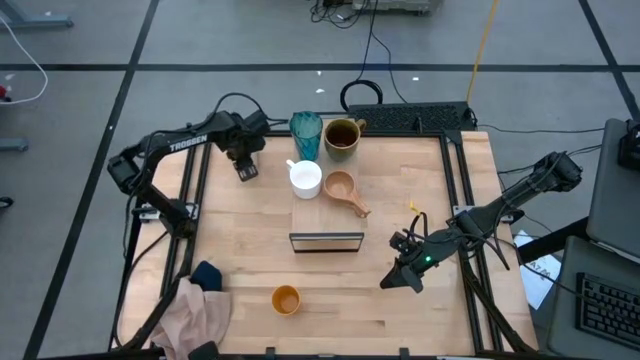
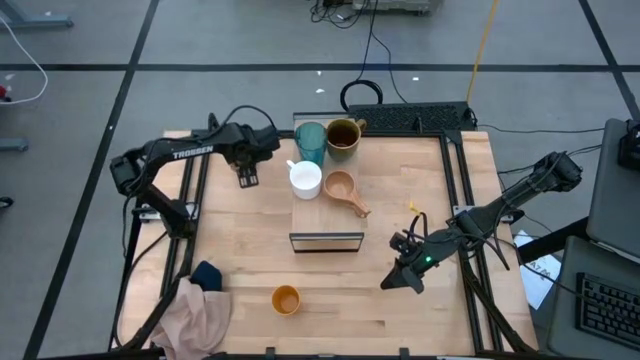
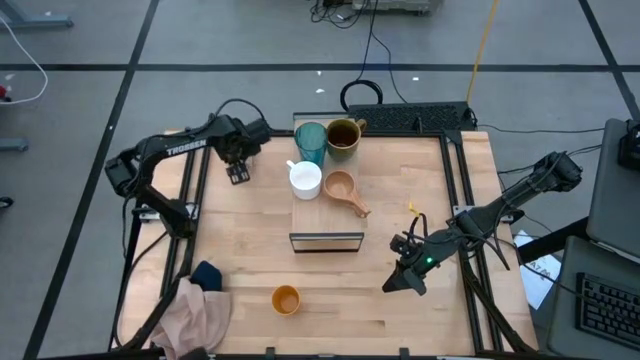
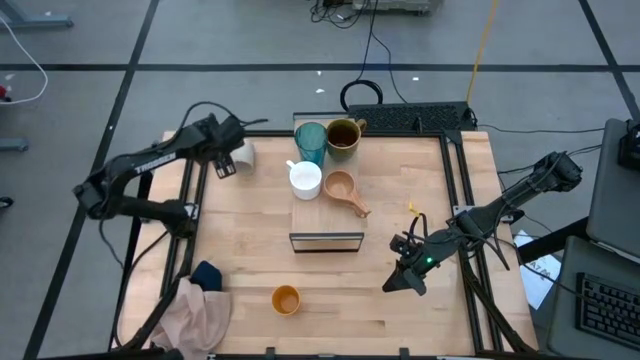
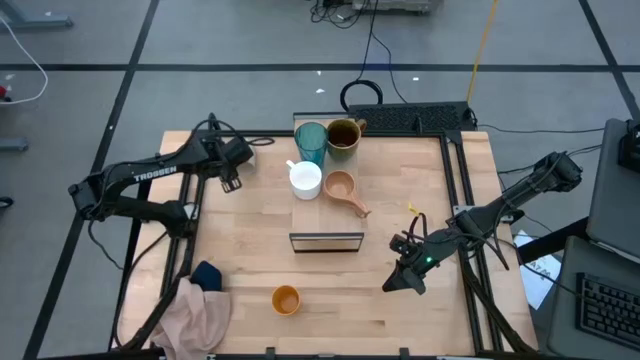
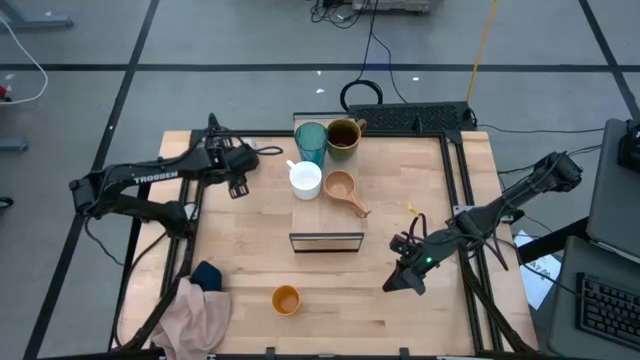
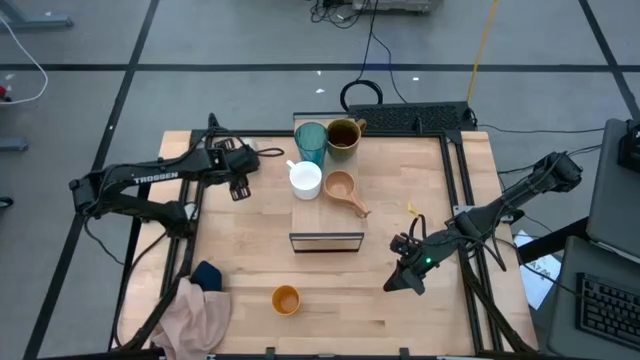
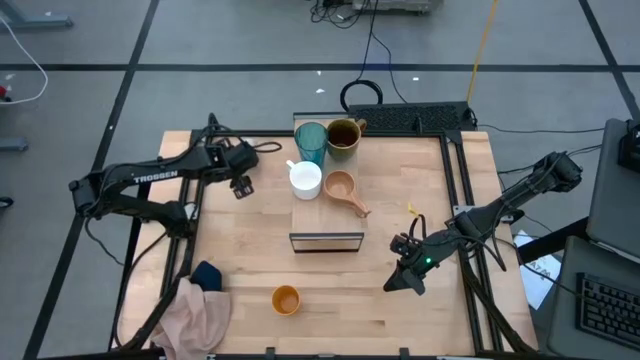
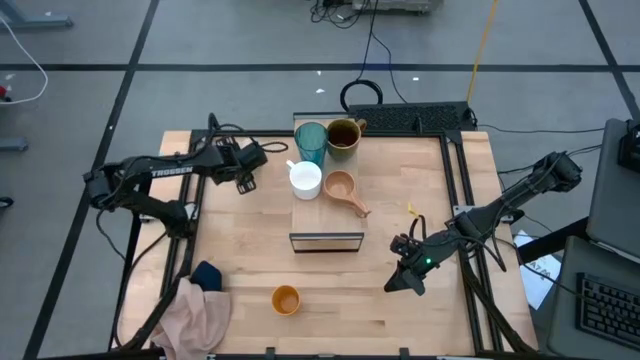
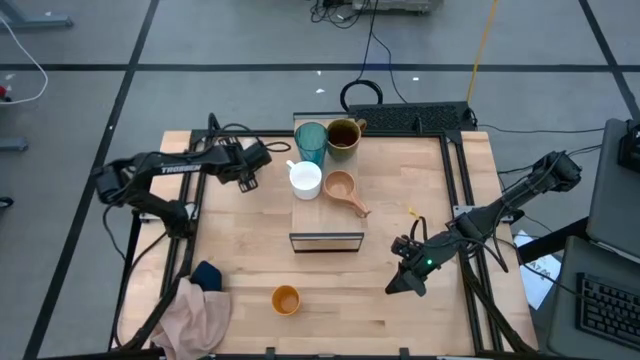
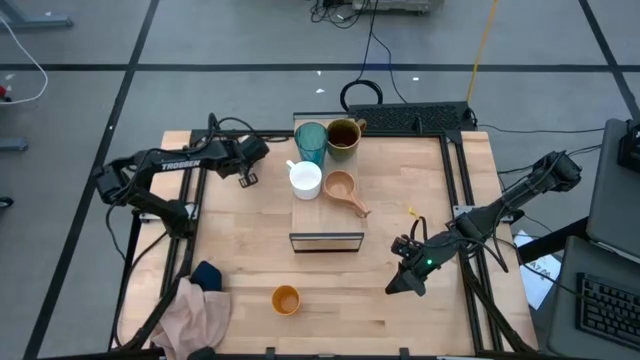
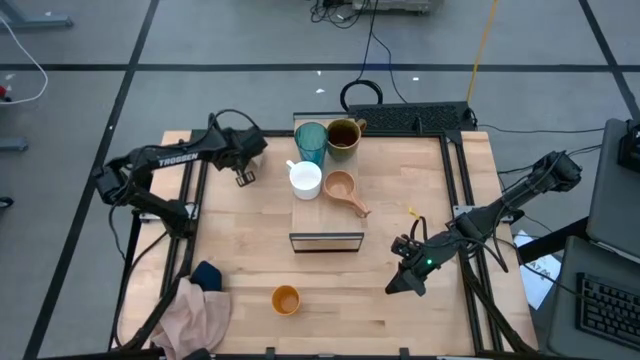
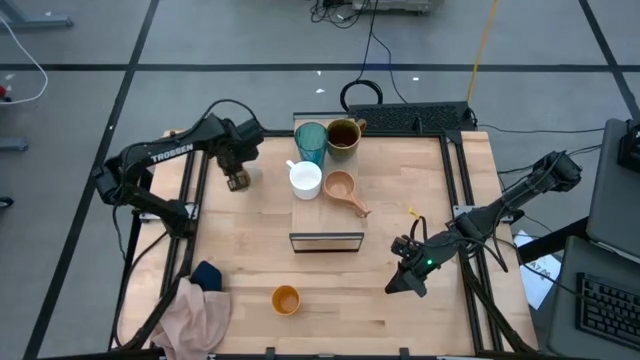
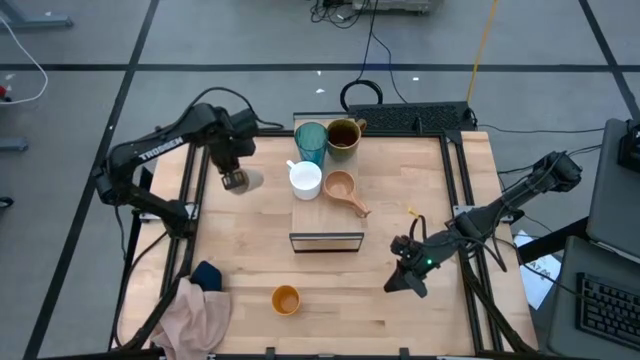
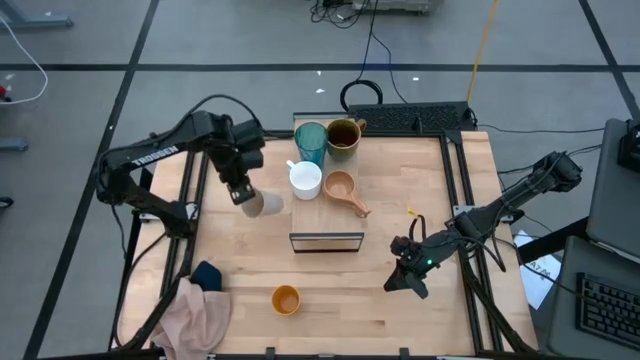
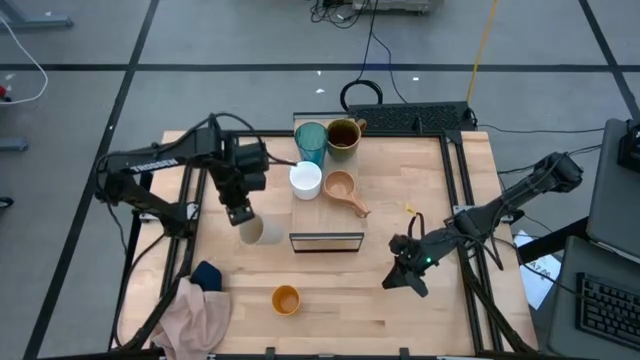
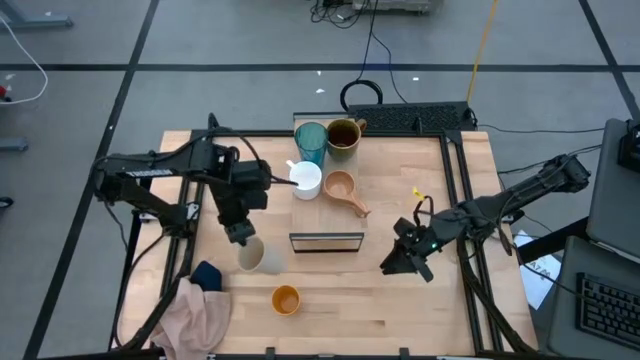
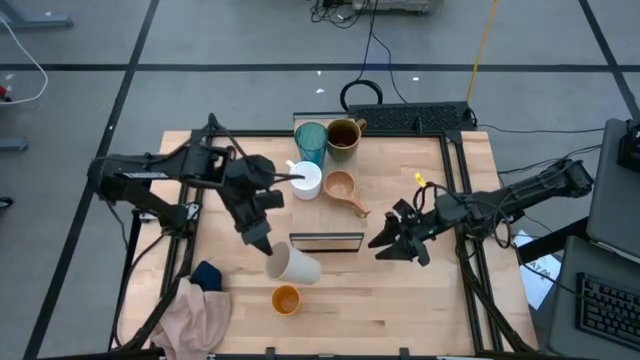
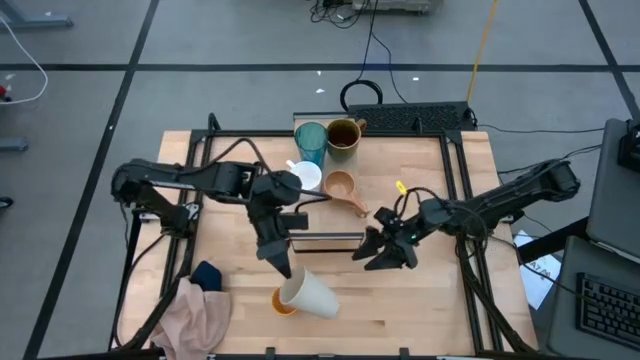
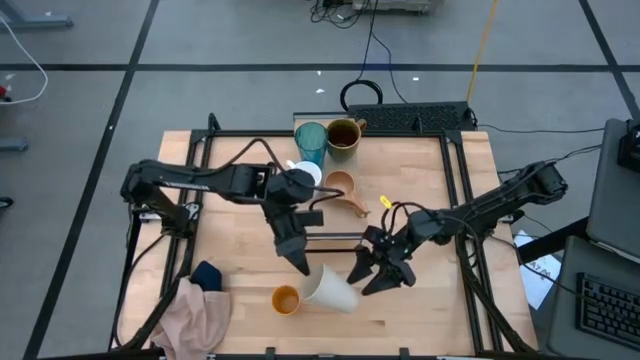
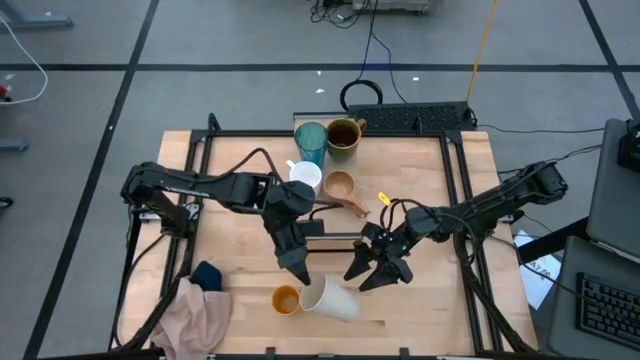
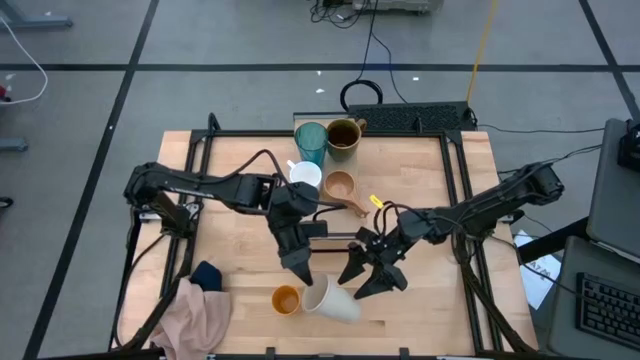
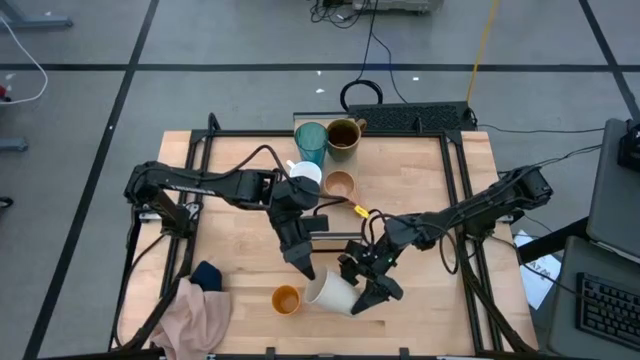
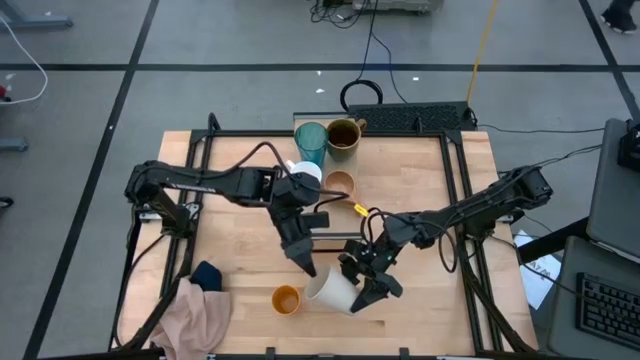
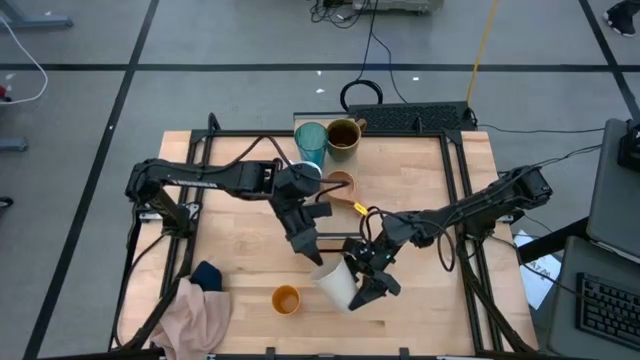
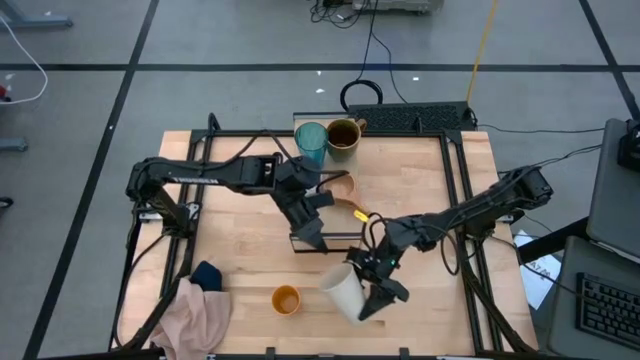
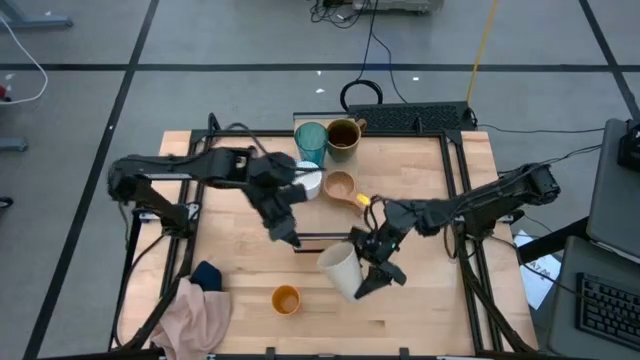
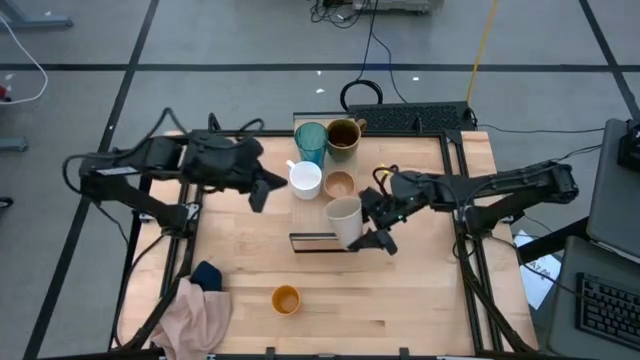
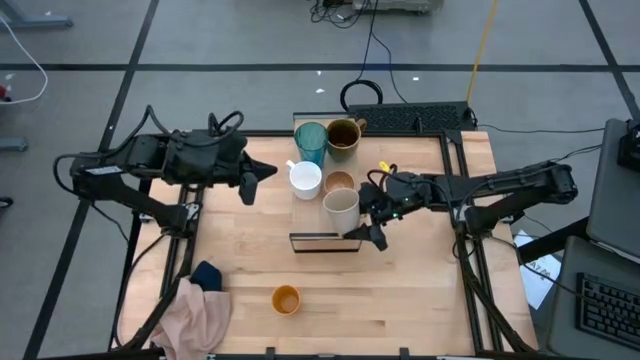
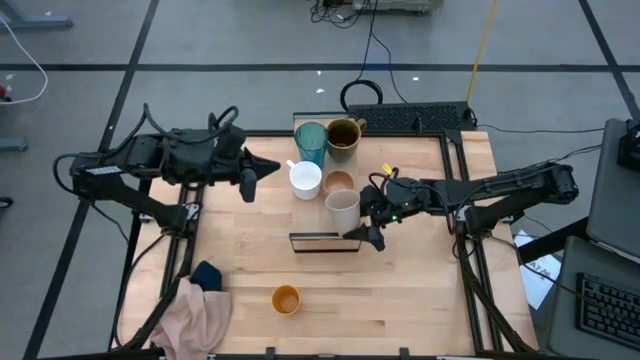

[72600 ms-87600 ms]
Task: Stack small to large cups/mugs on shelf
Put the white cup on the shelf

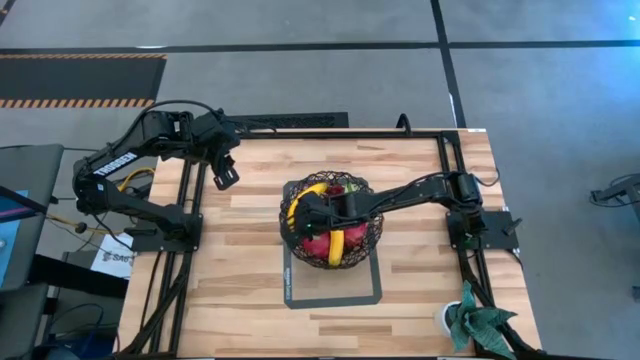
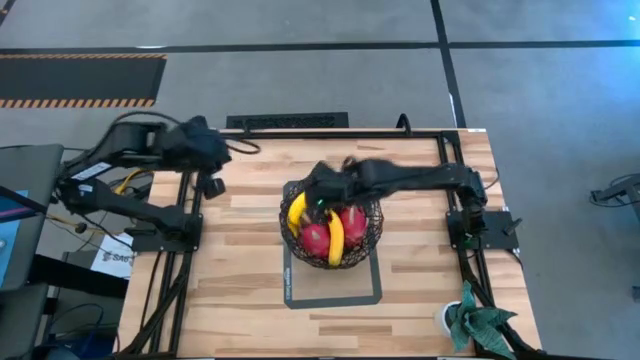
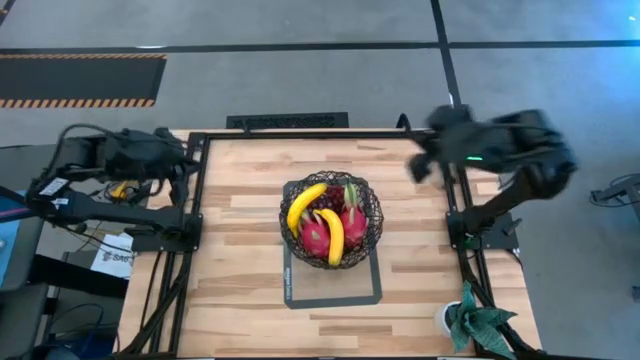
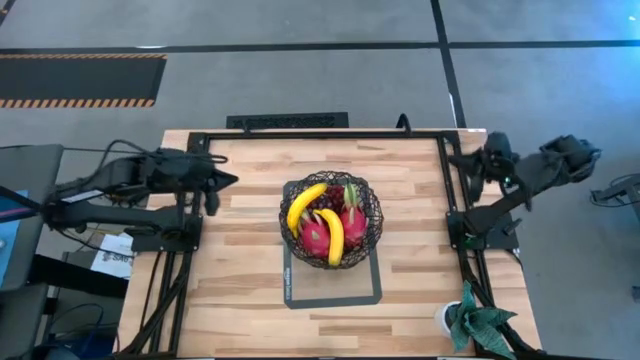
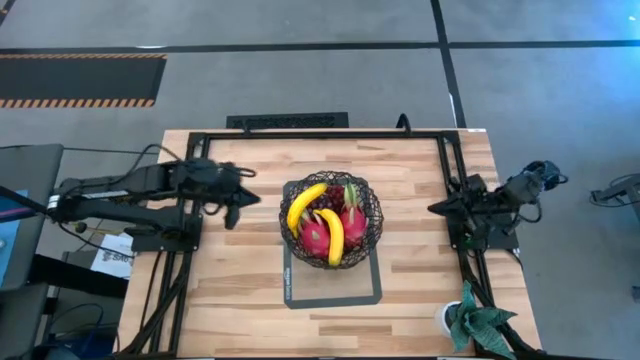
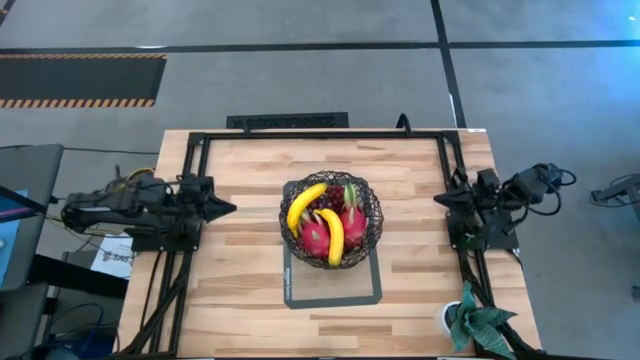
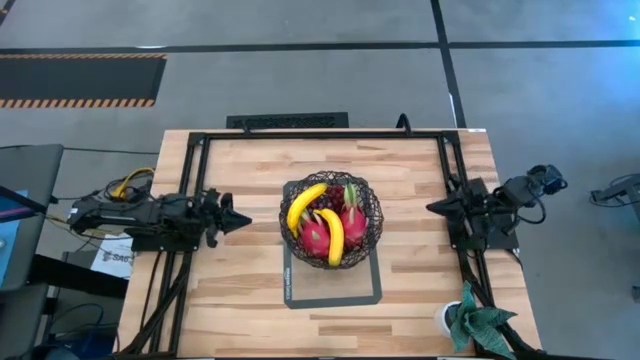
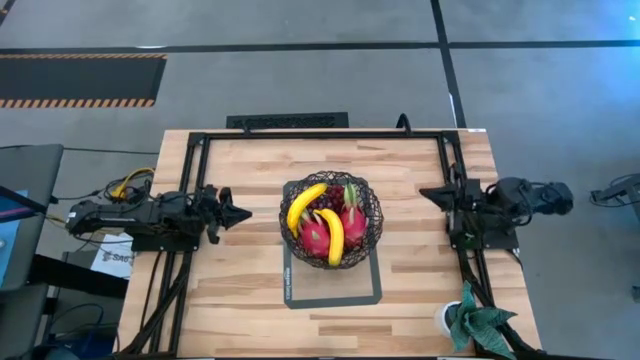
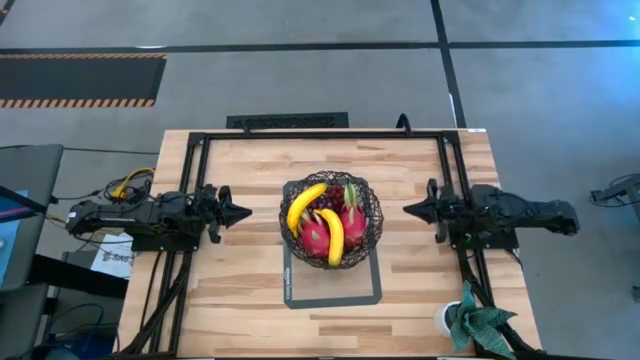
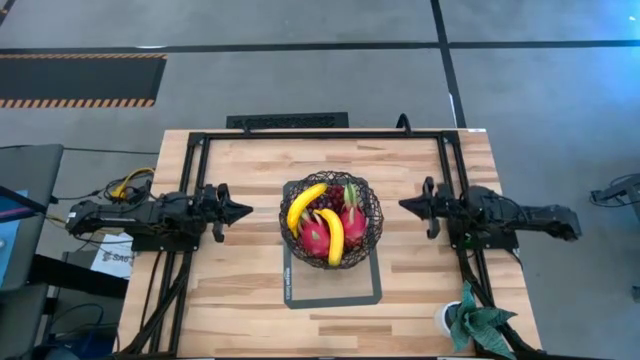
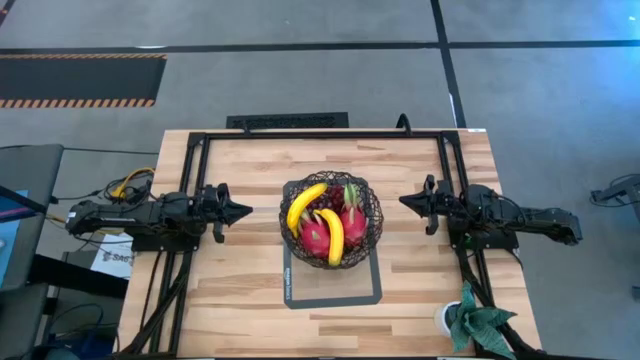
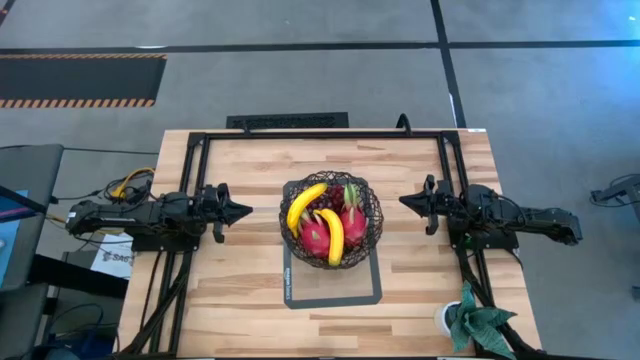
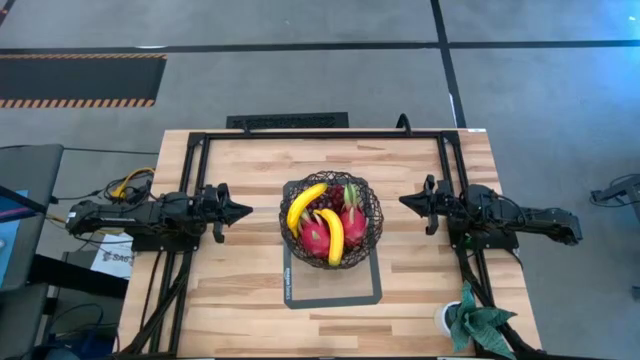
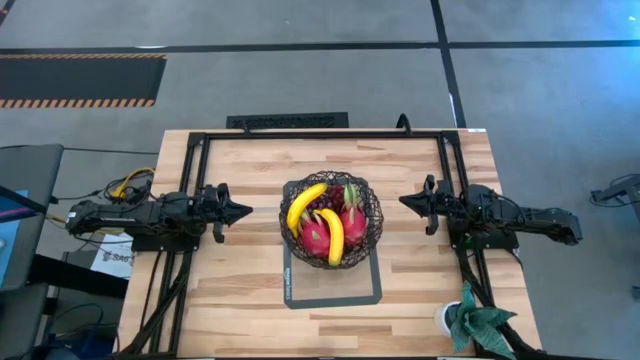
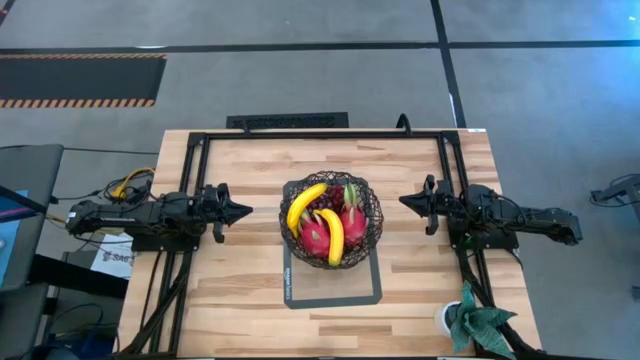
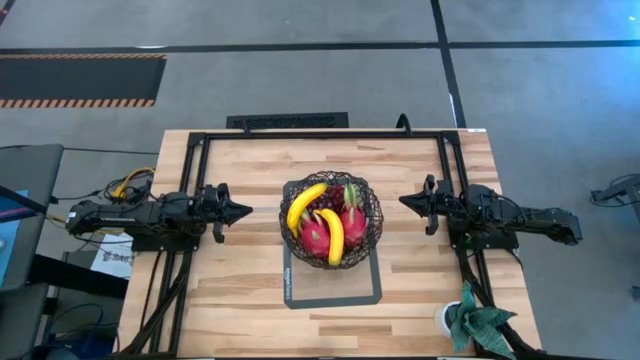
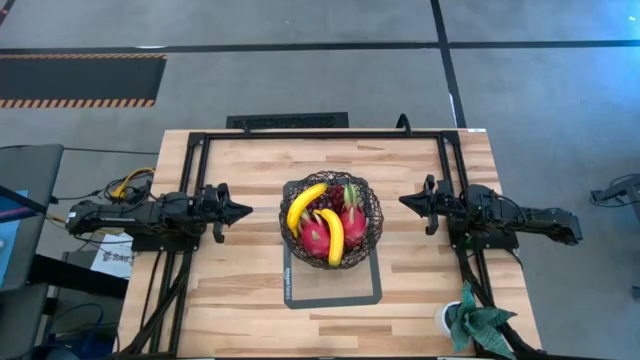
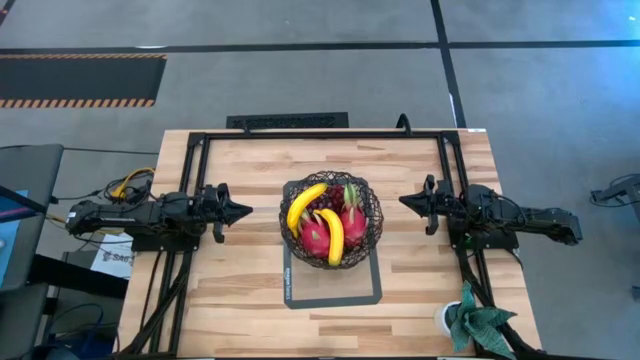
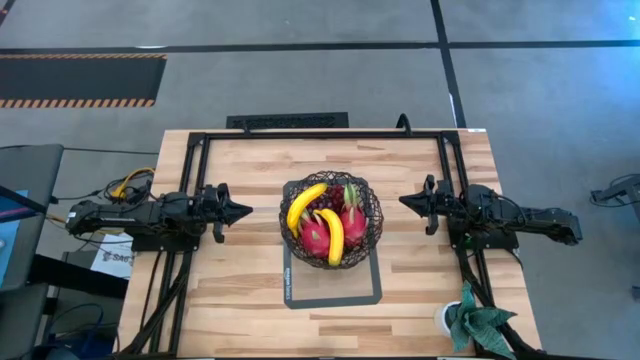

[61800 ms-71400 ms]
Task: Build produce basket
Return to Home Position
